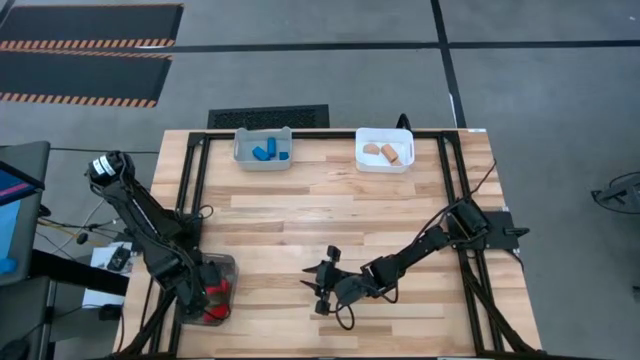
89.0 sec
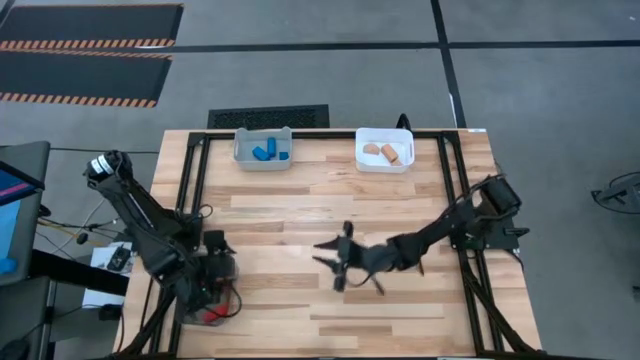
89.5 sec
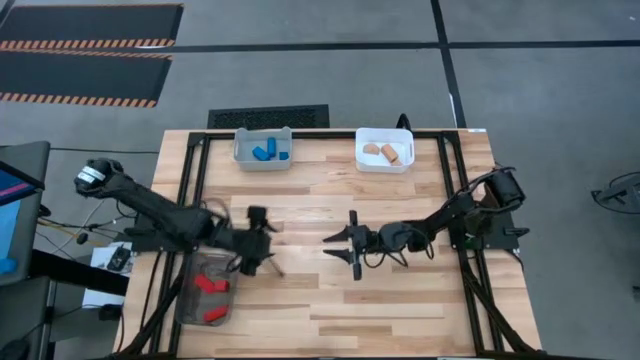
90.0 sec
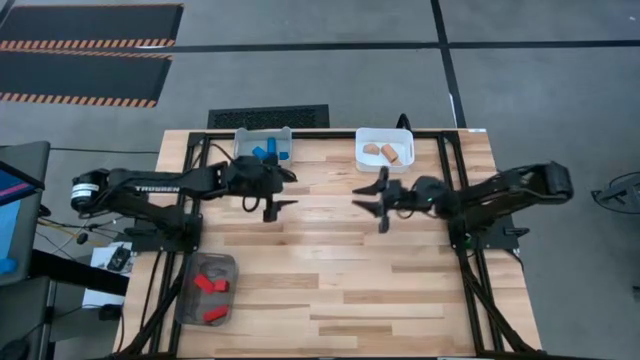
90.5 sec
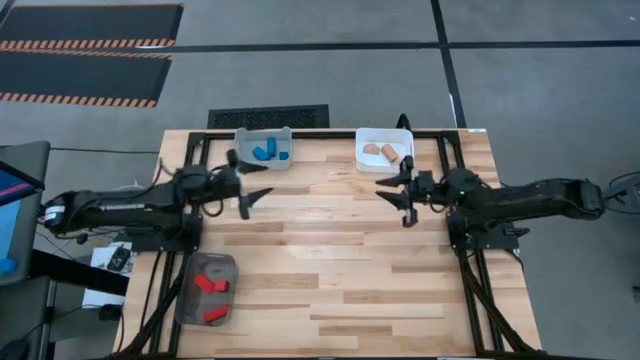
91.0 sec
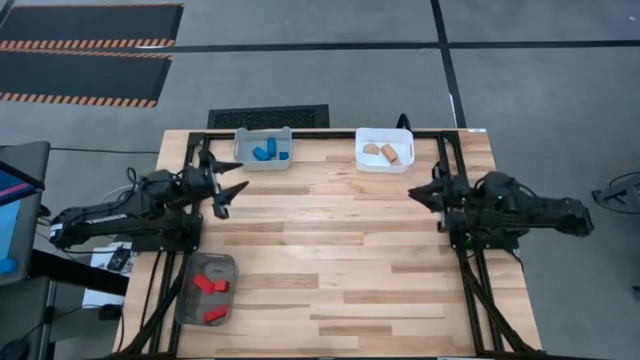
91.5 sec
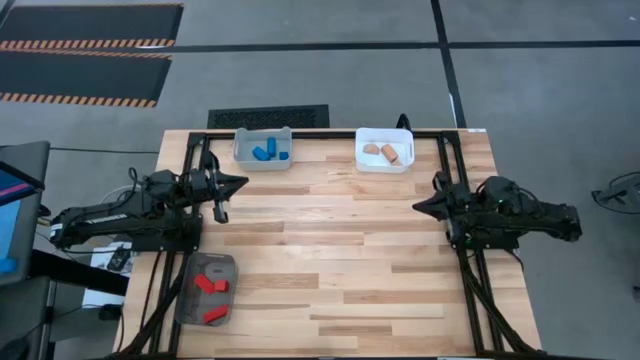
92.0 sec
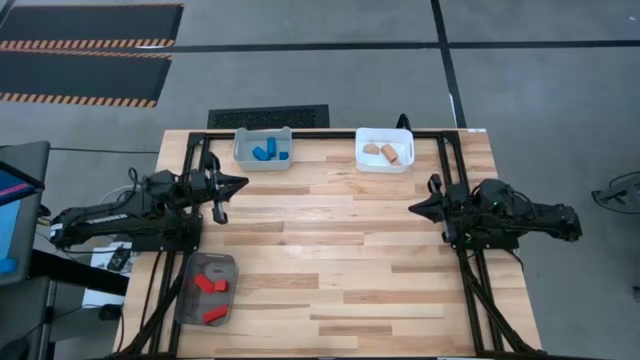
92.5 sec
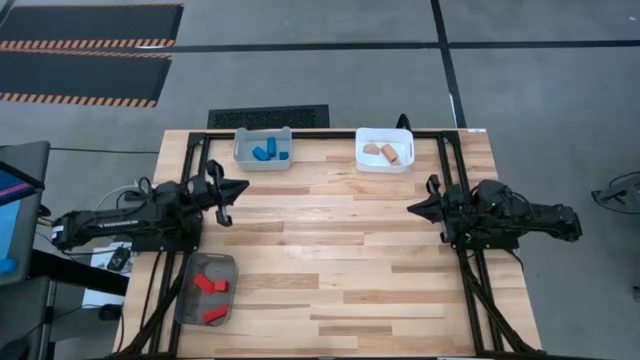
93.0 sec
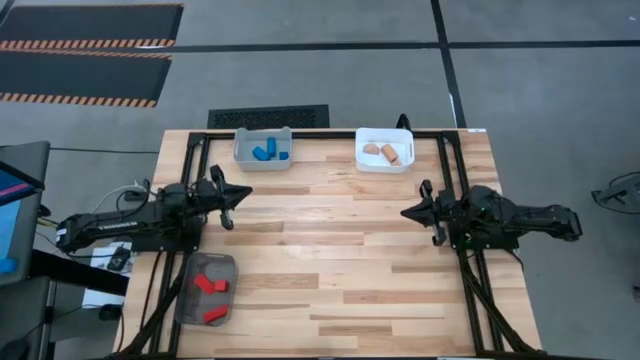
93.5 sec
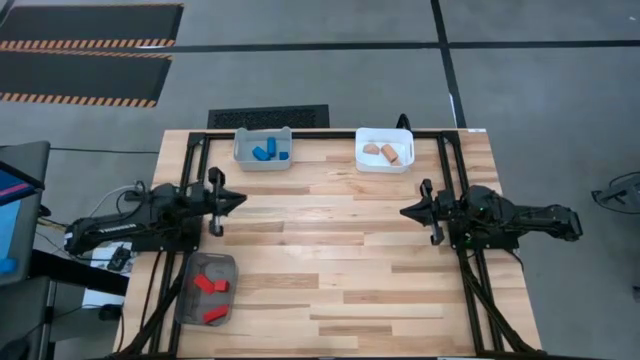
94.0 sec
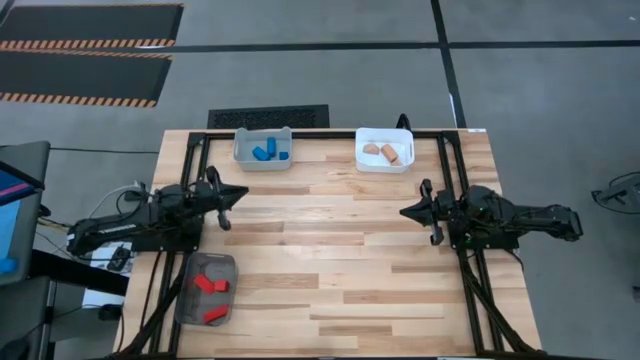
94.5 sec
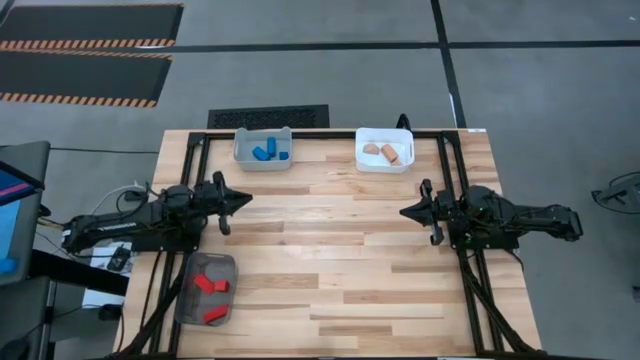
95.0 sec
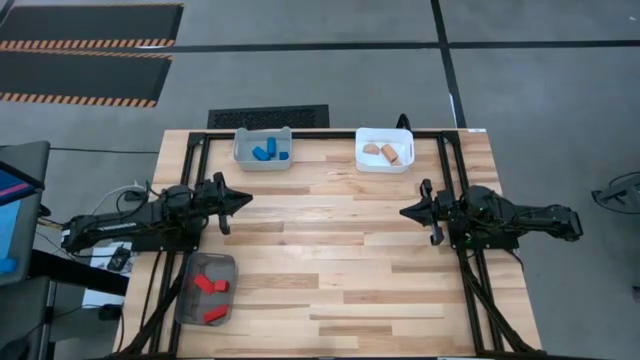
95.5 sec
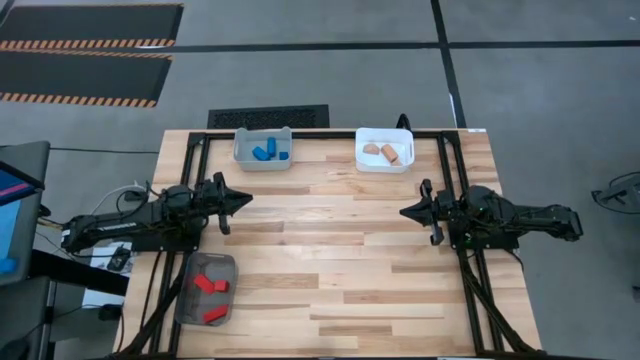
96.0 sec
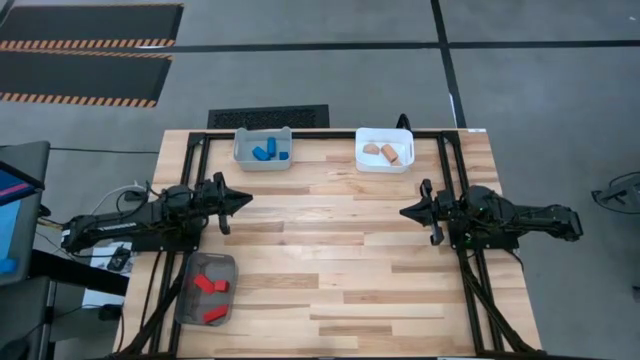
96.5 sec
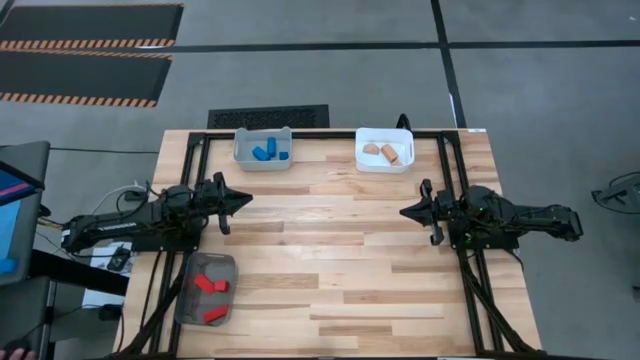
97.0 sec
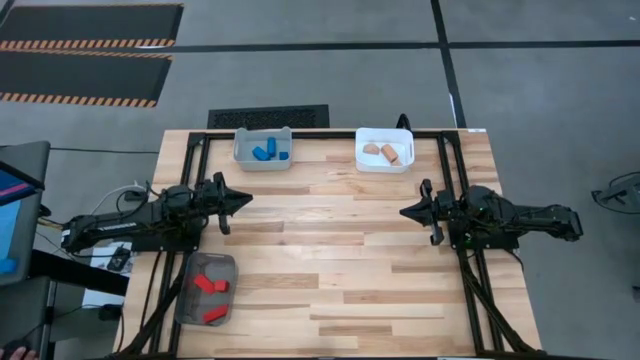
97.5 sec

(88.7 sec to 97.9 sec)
Task: Sort & place blocks by color
Return to Home Position

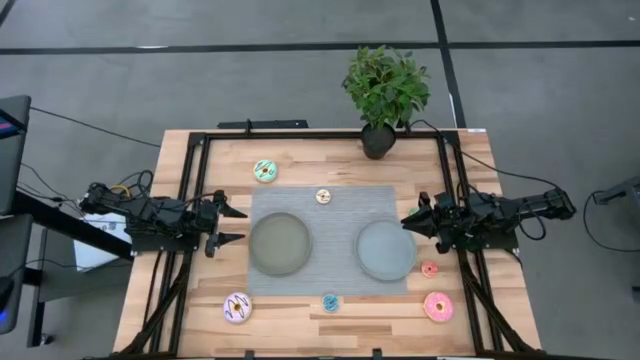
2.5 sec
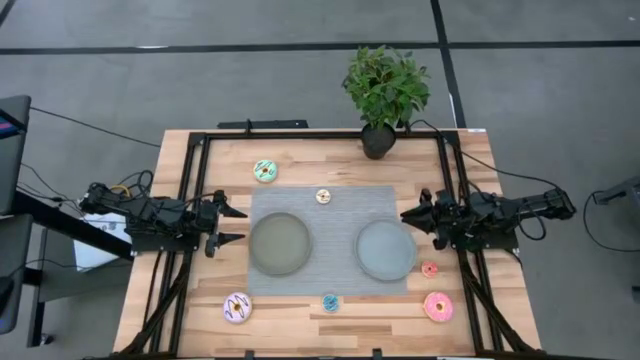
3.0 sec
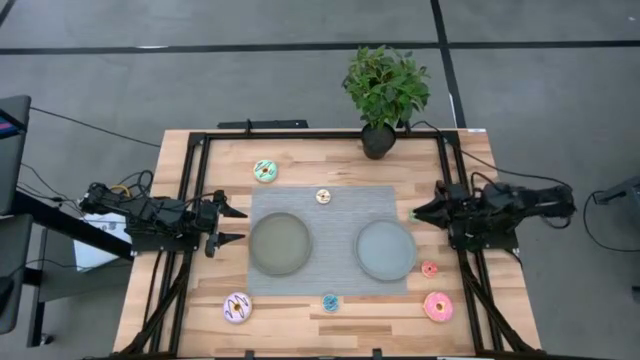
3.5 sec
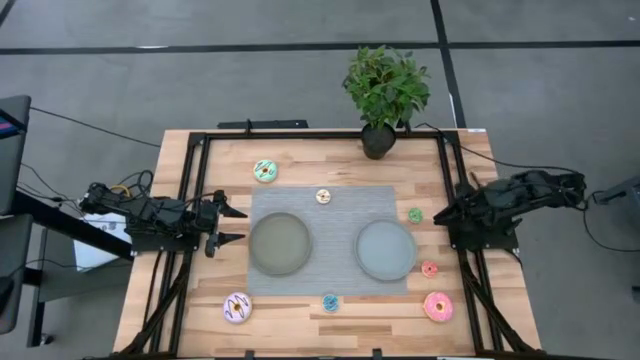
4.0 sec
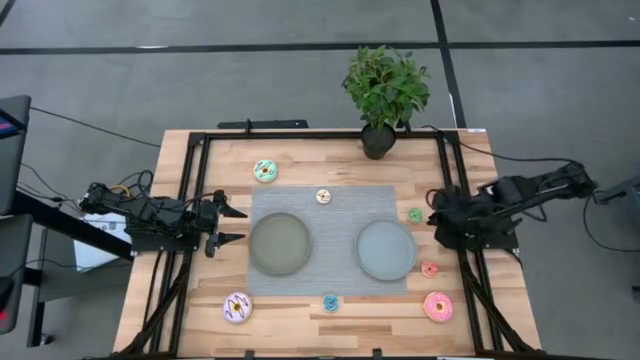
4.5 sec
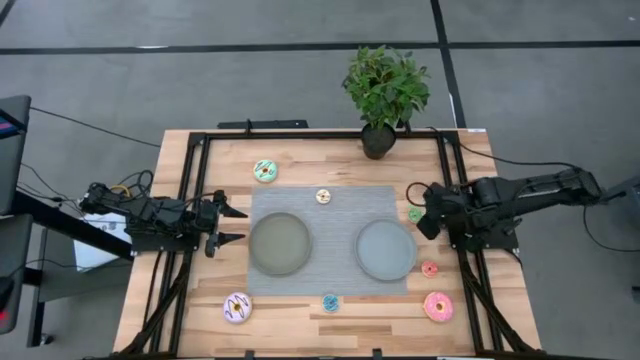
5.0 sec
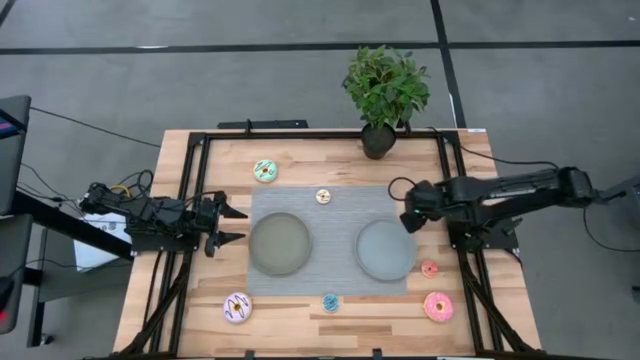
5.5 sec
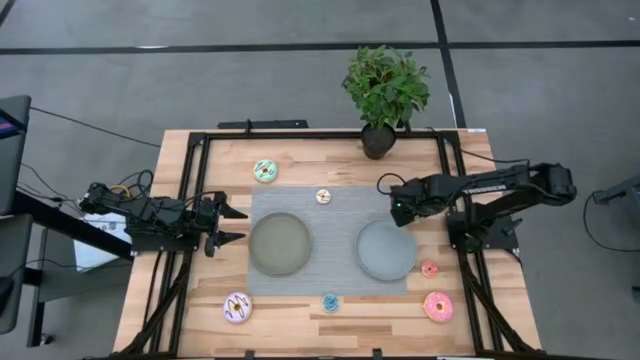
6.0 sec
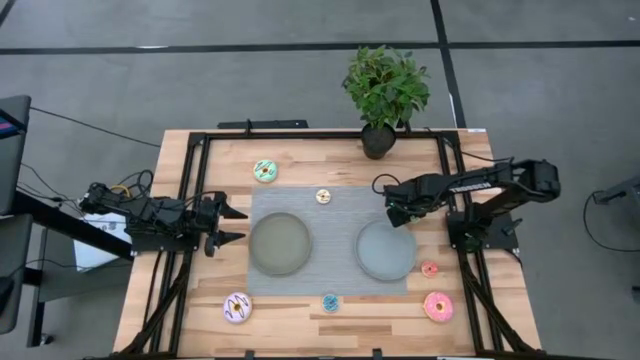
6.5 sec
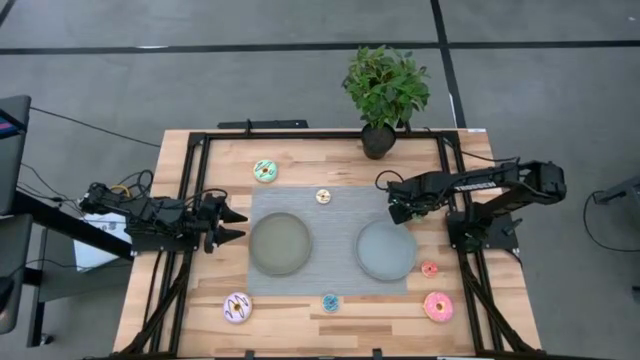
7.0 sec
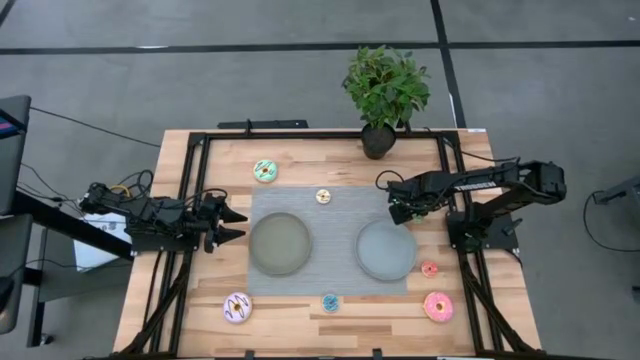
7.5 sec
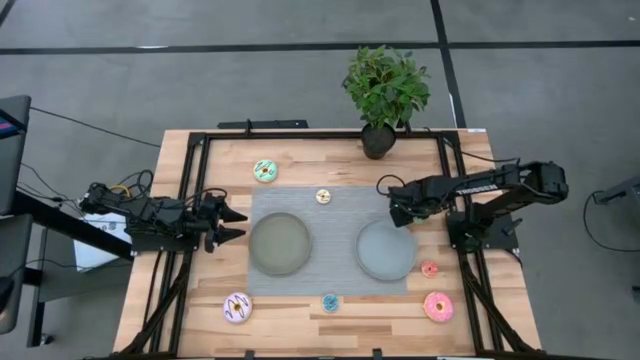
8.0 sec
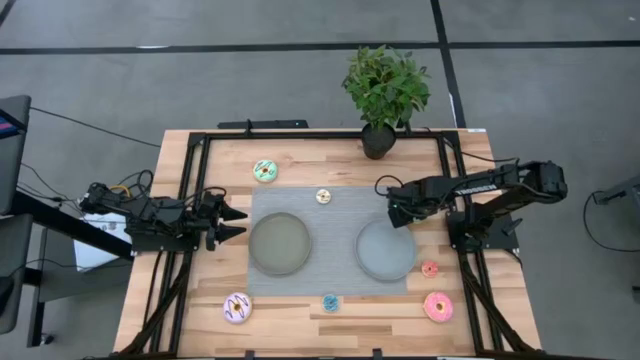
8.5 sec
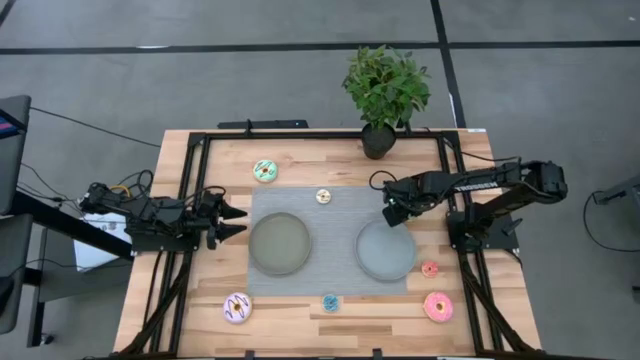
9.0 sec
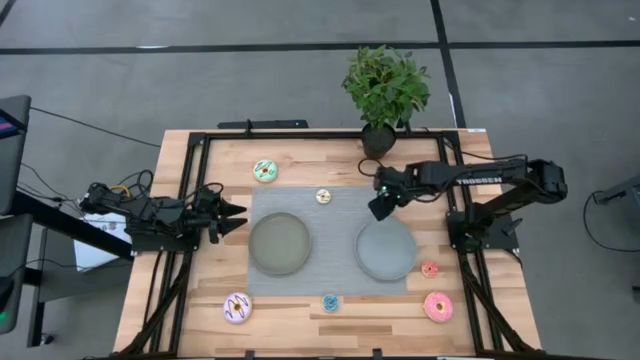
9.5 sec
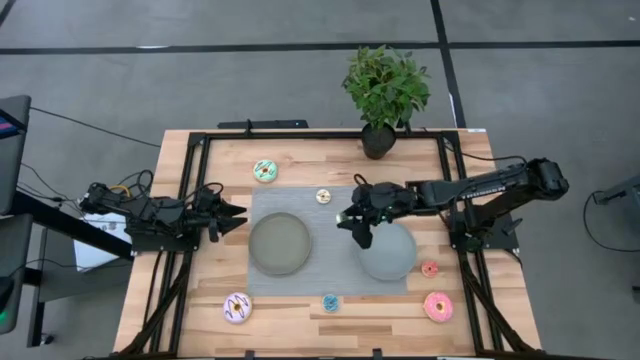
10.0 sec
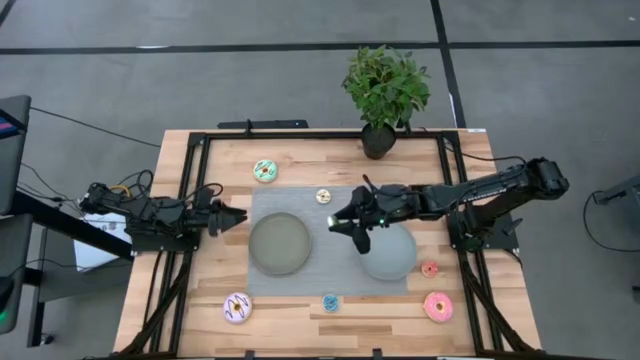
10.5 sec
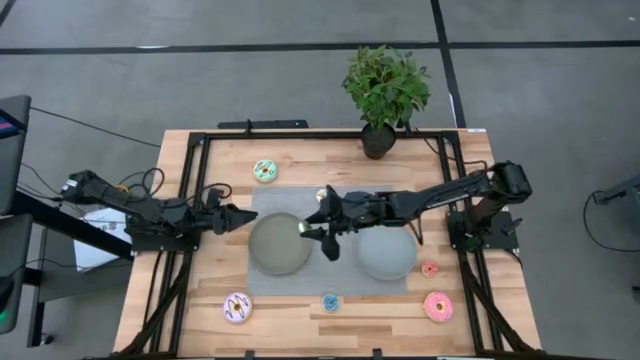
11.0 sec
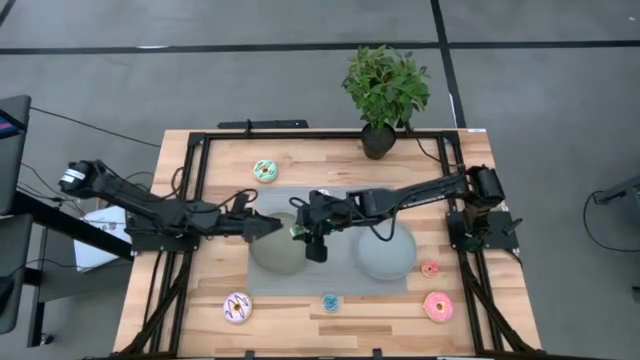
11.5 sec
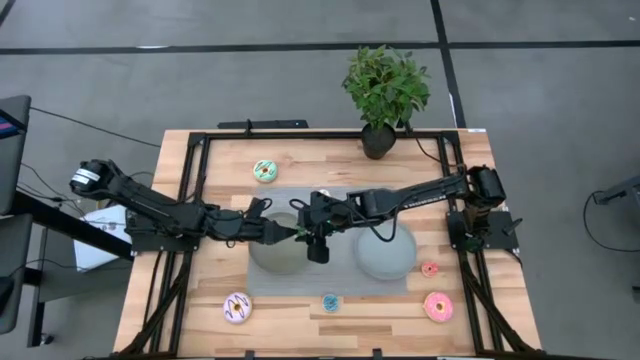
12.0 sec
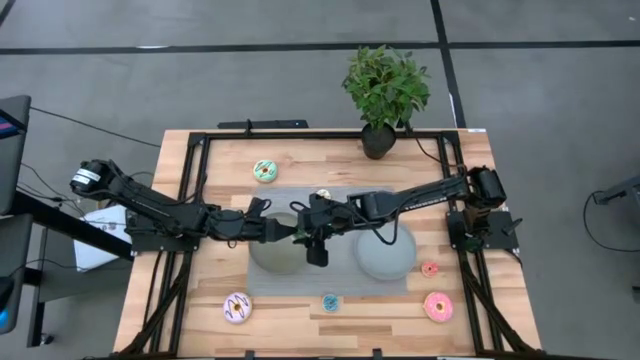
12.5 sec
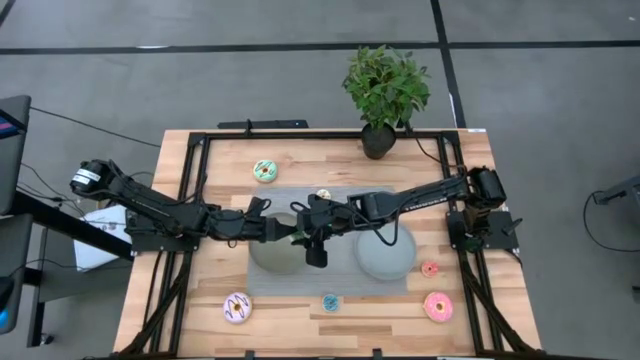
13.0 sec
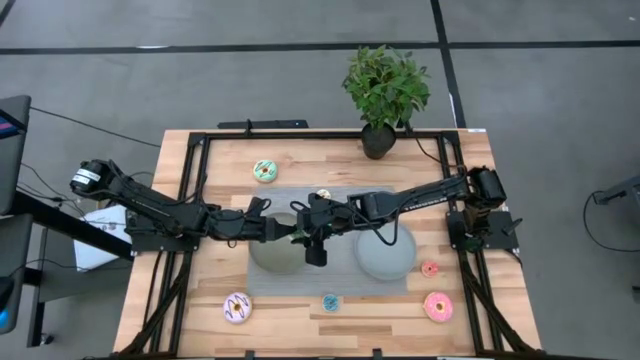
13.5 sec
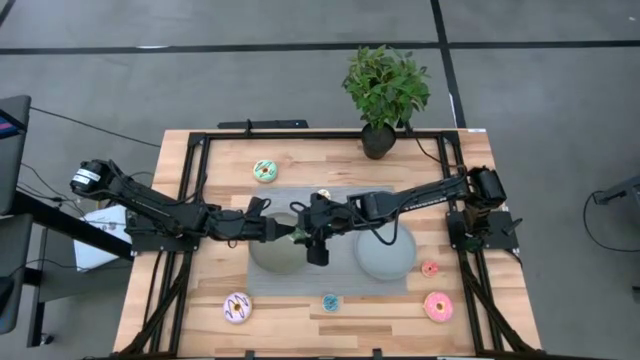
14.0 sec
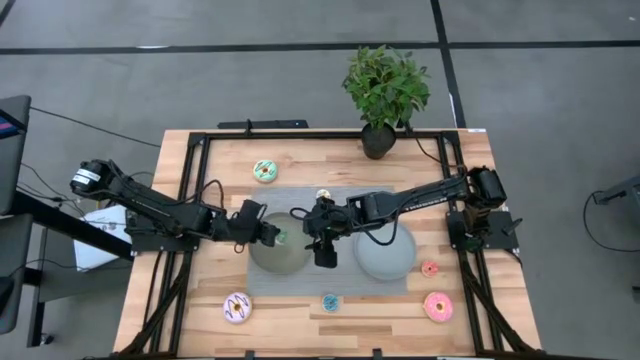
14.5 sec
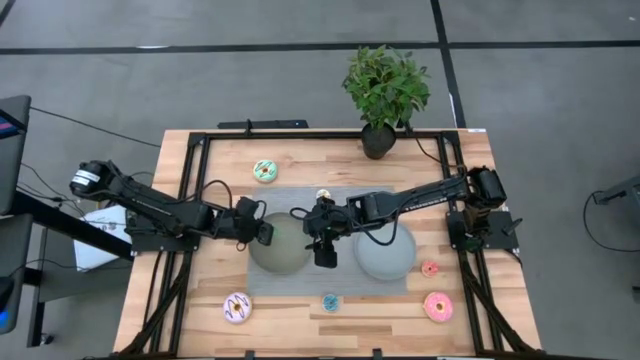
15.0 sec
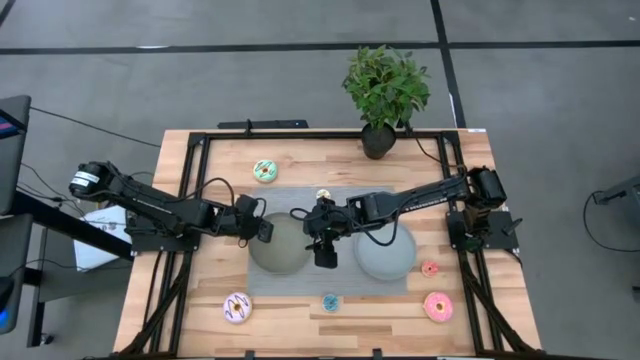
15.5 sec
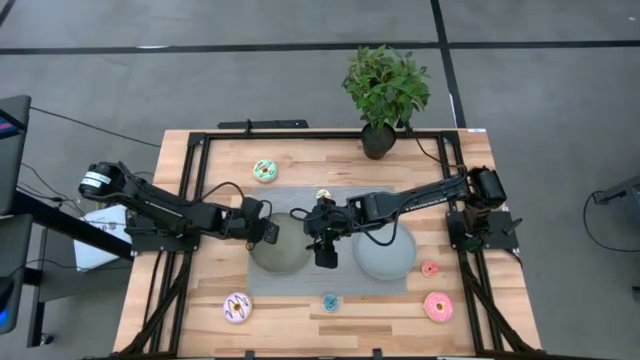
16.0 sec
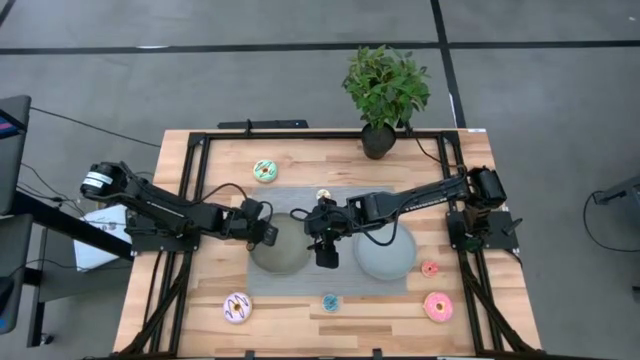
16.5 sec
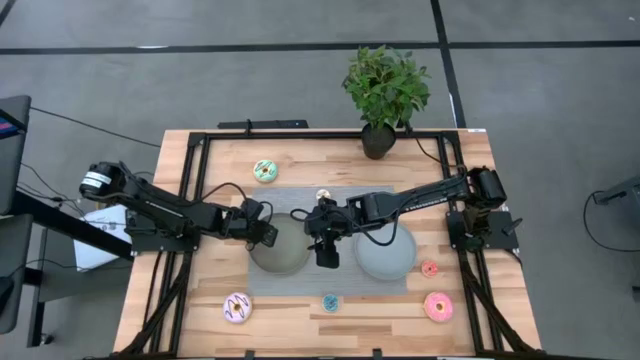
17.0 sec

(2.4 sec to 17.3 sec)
Task: Pick & Place donuts
Put the small green donut on the dark gray plate
